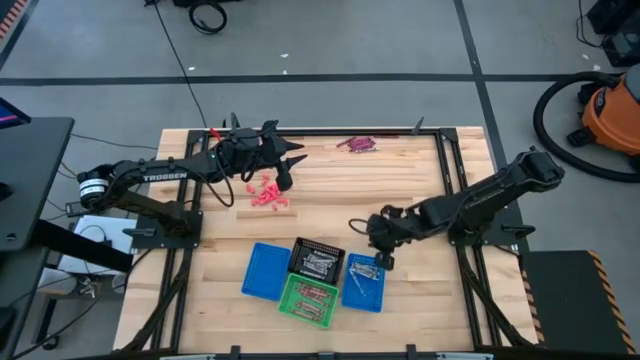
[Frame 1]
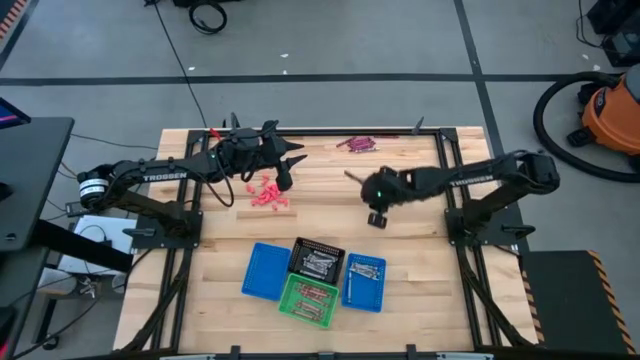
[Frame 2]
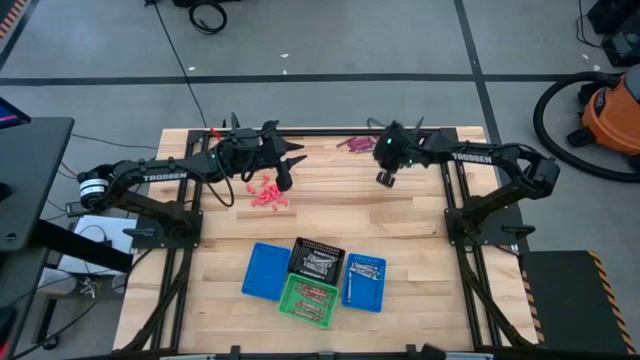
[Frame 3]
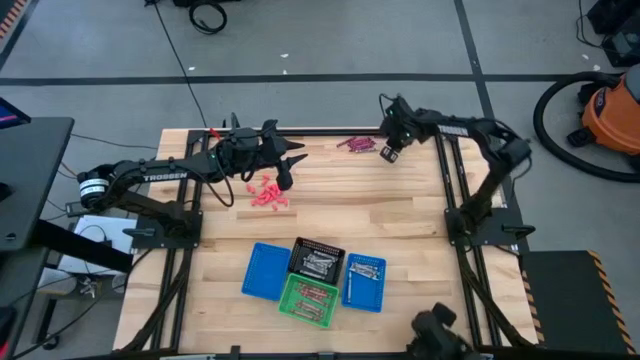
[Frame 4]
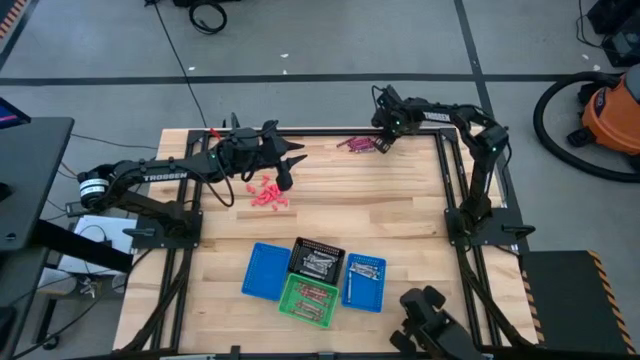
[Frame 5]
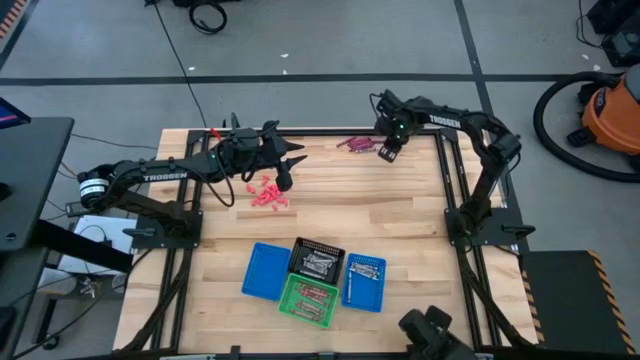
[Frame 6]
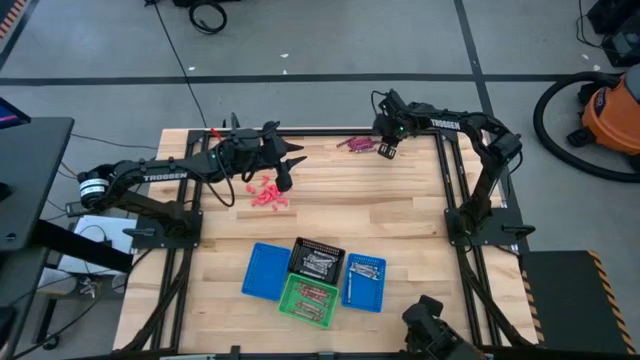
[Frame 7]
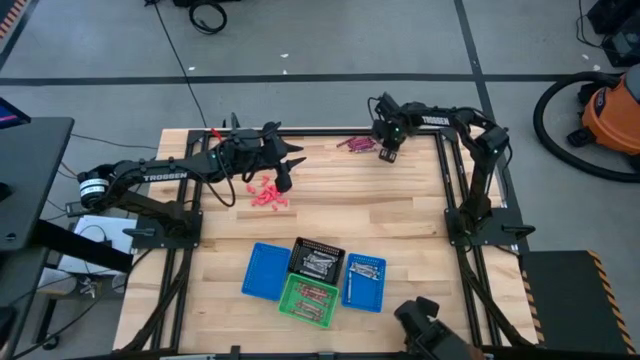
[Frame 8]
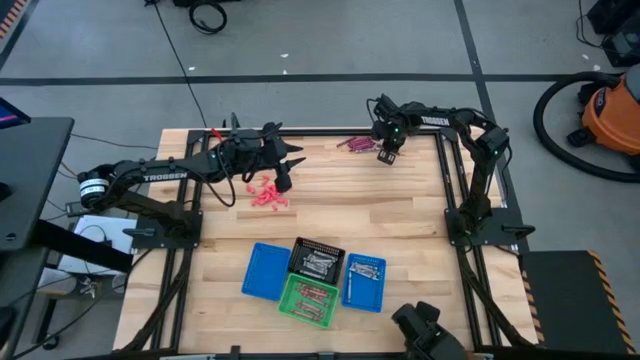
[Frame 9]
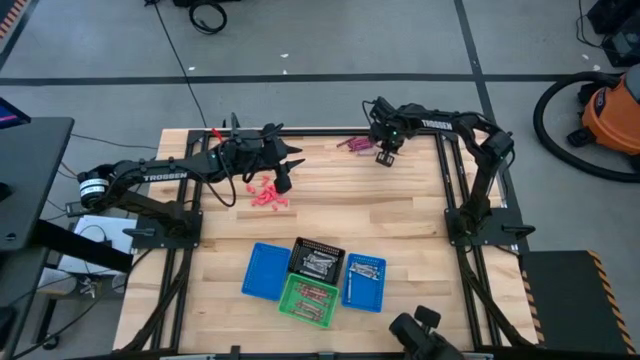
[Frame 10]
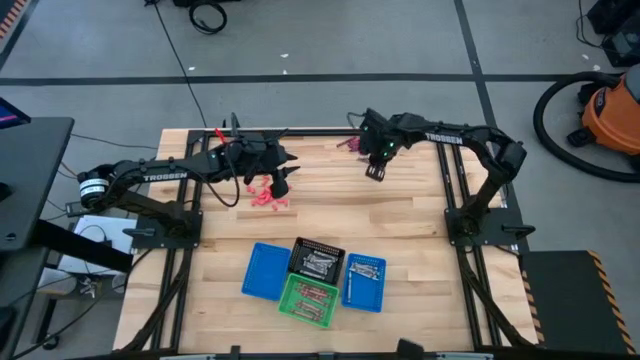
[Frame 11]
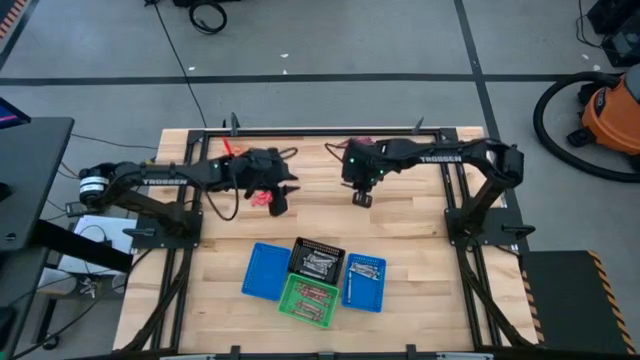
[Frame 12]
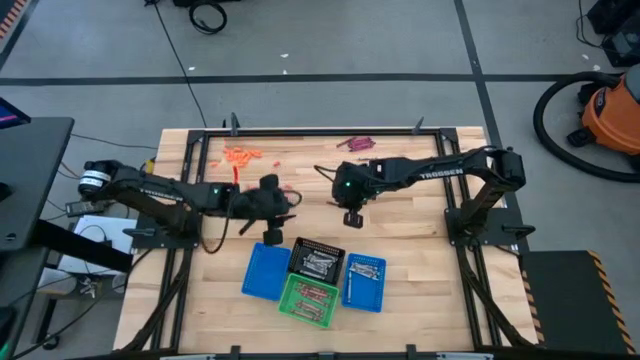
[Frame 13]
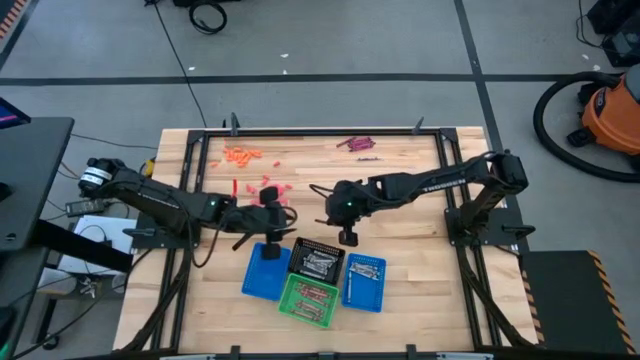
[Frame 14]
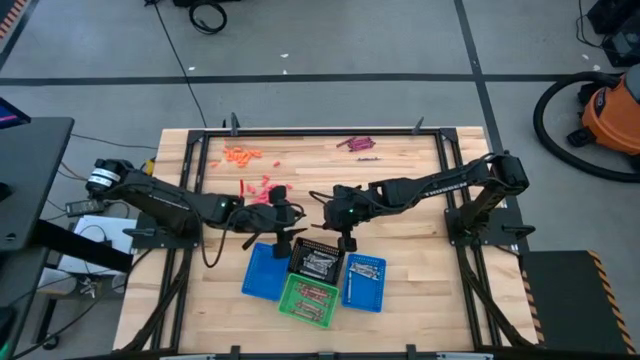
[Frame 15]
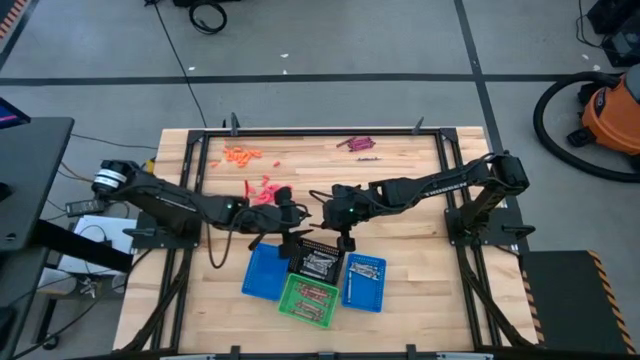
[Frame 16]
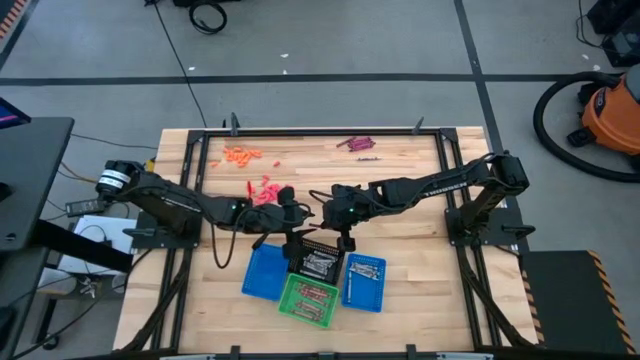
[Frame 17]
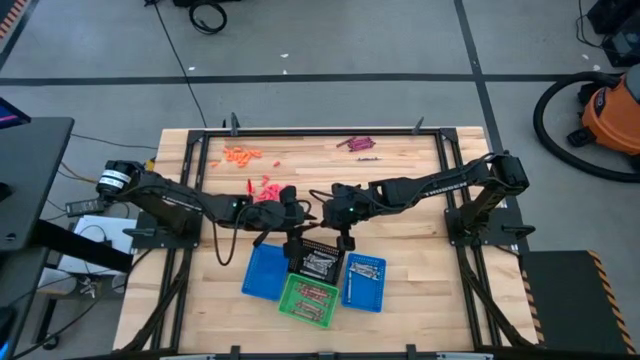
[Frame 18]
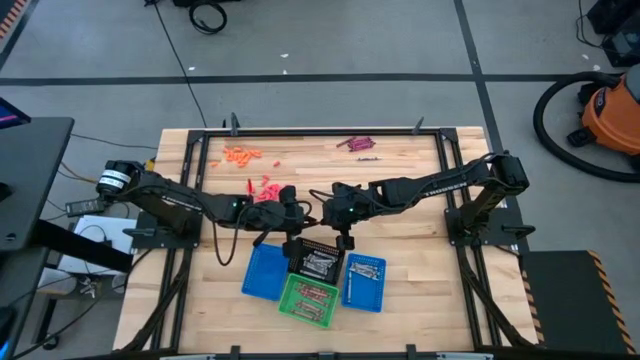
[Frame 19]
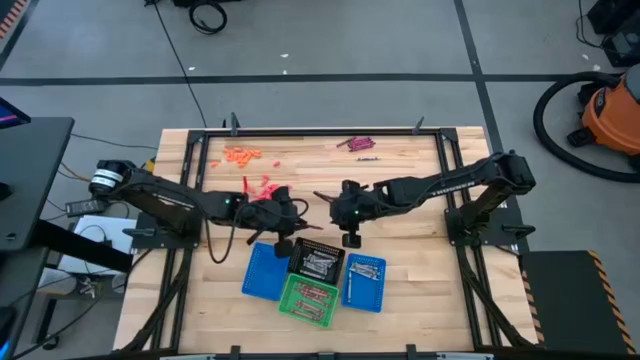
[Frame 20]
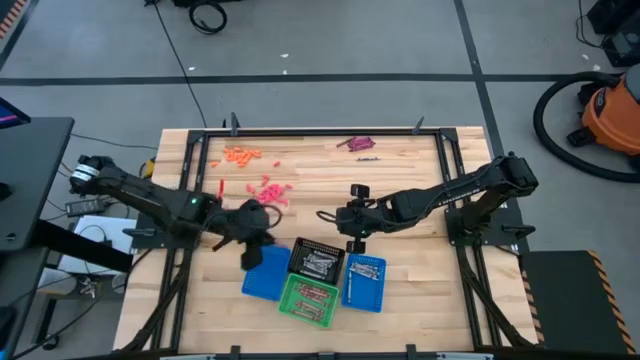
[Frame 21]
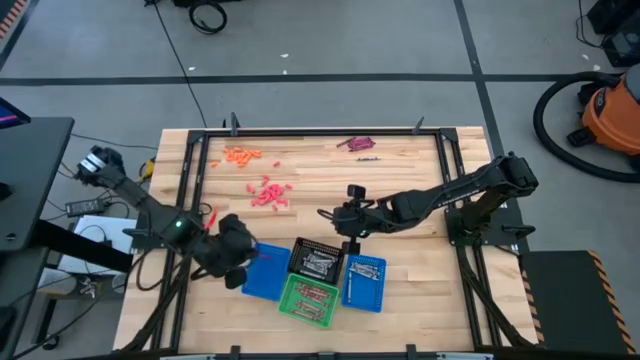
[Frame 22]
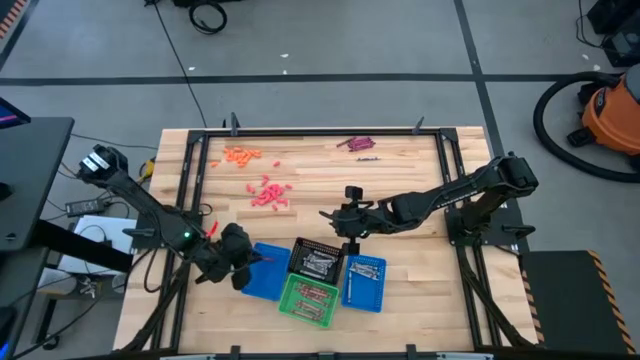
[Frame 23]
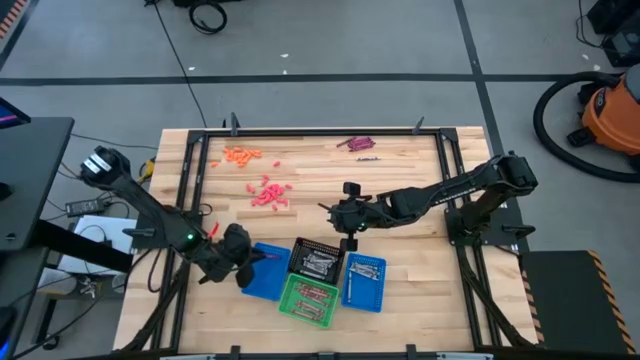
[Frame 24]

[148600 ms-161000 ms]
Task: Sort crayons
Put the dark red crayon into the left blue bin

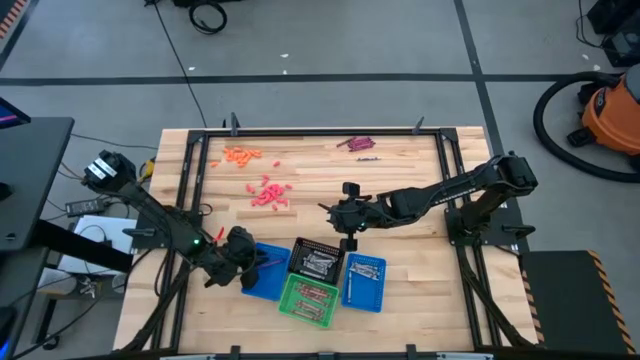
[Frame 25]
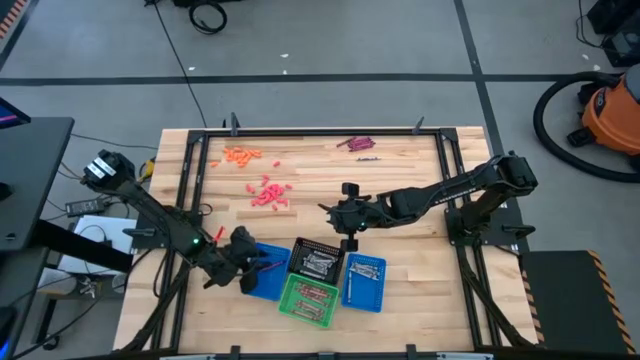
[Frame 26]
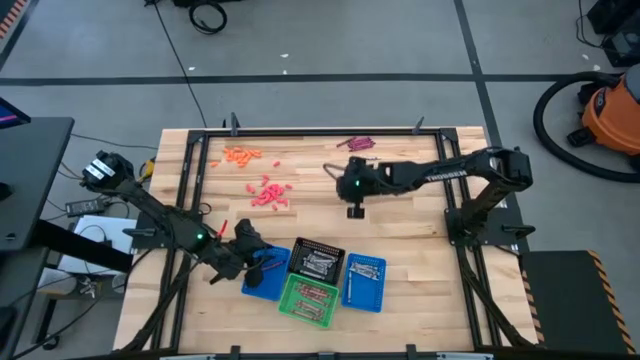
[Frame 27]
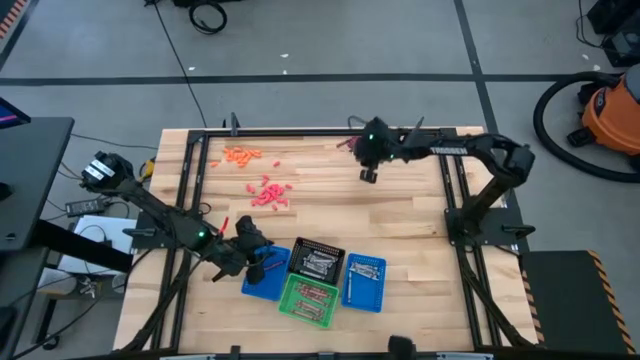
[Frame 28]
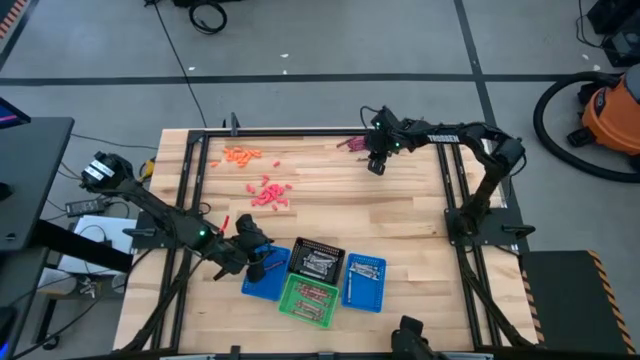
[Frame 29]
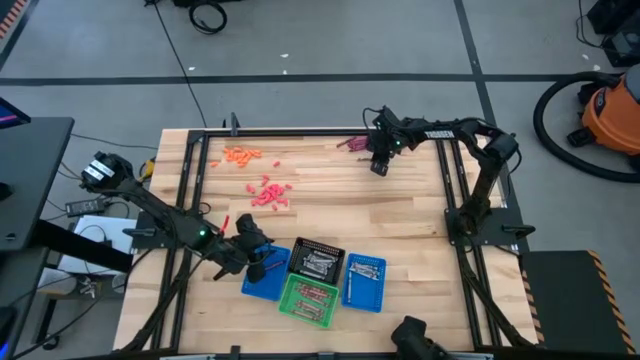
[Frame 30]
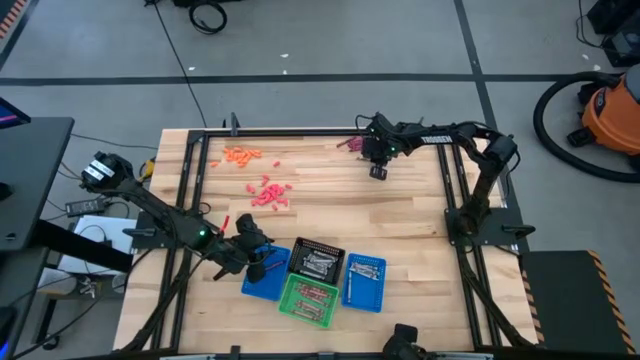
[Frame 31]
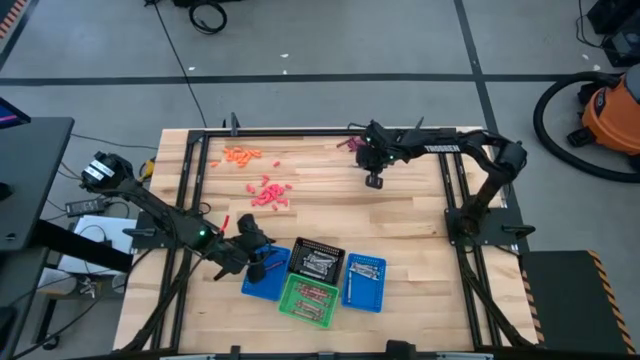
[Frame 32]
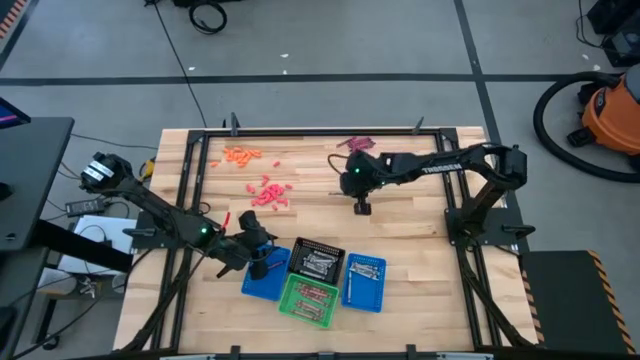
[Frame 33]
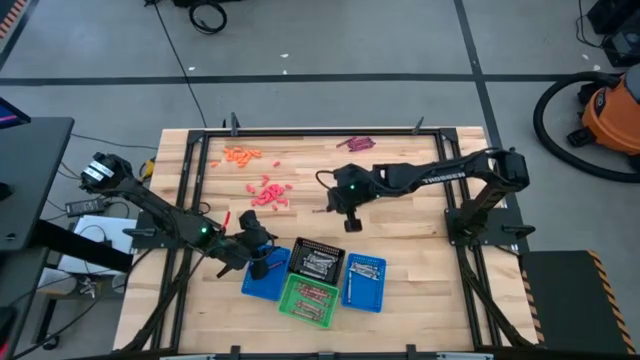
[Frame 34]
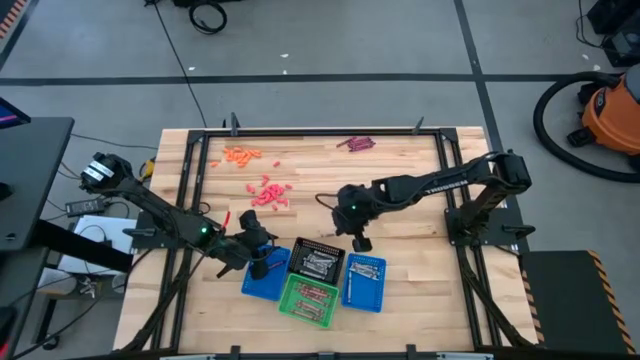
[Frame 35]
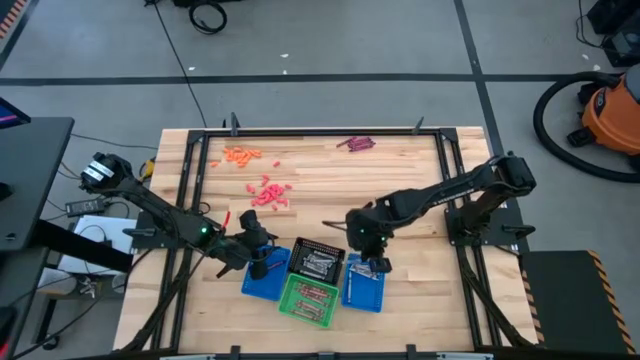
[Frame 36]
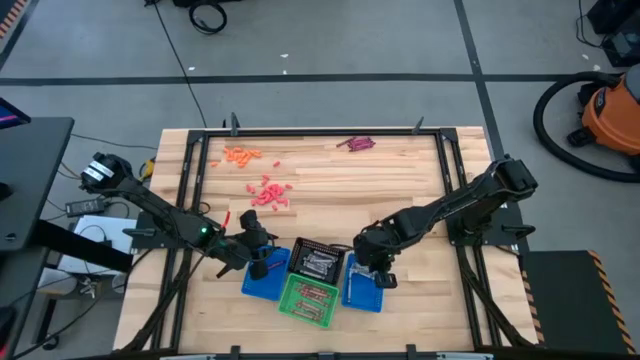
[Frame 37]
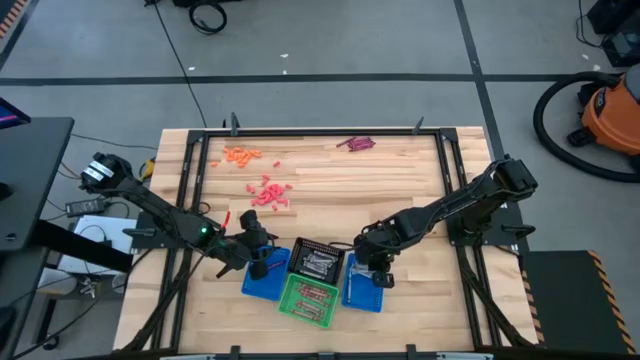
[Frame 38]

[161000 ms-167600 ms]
Put the white crayon into the right blue bin
